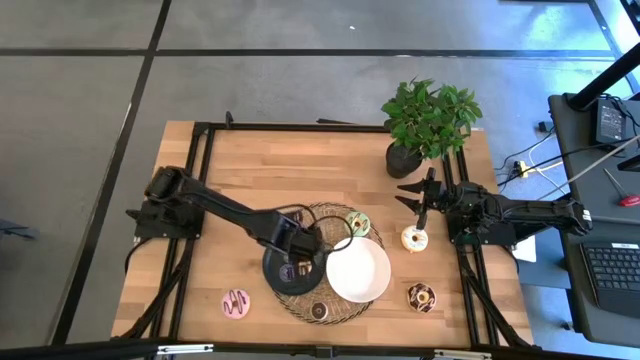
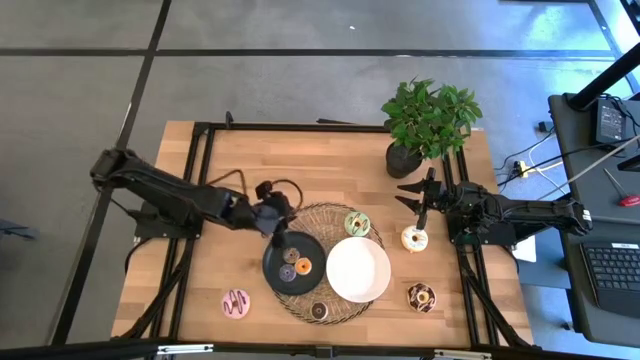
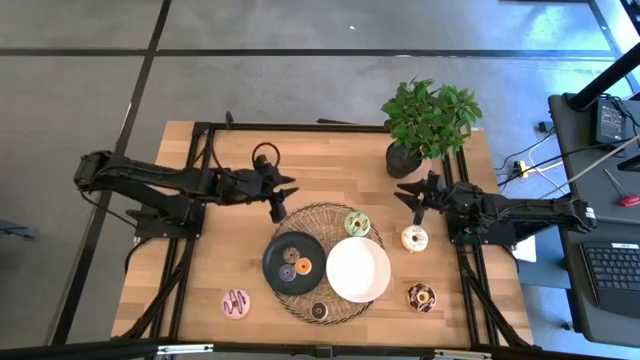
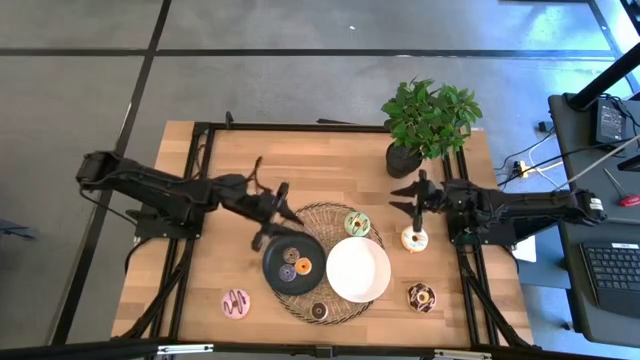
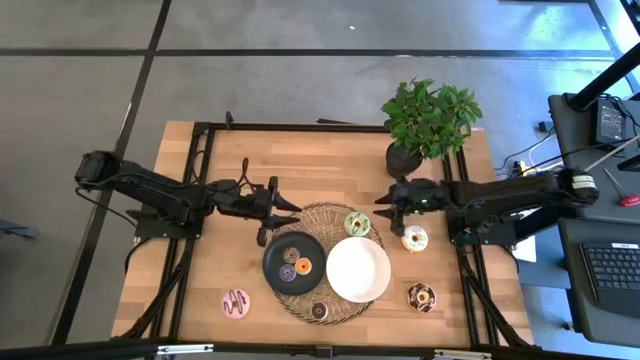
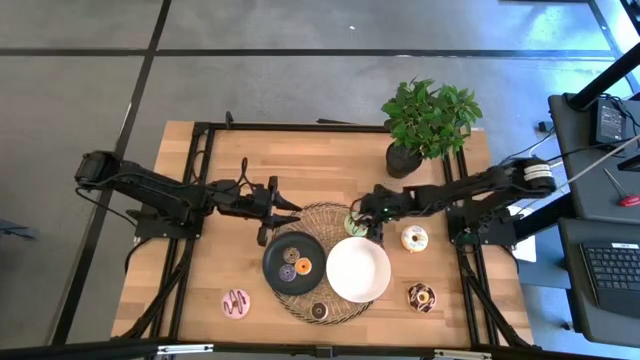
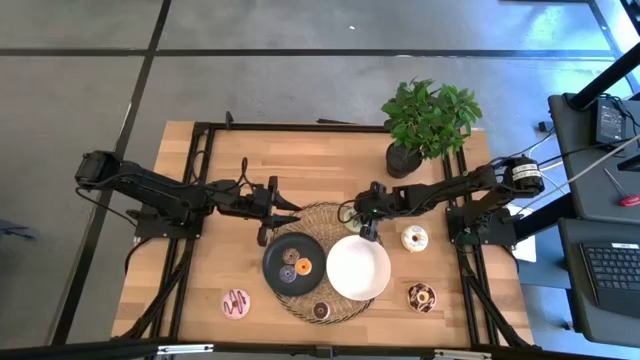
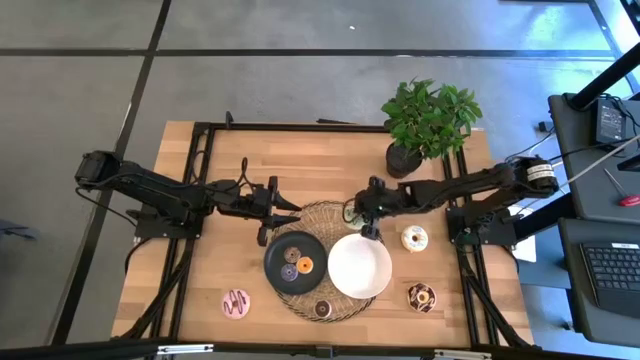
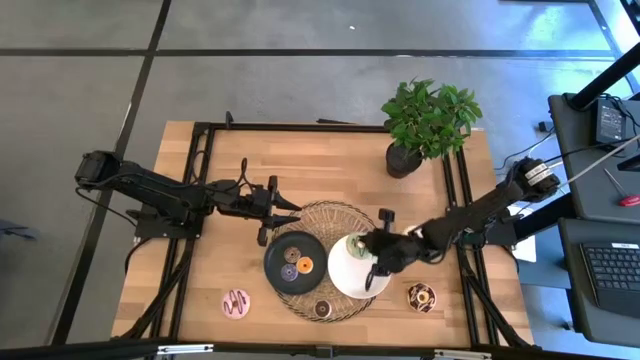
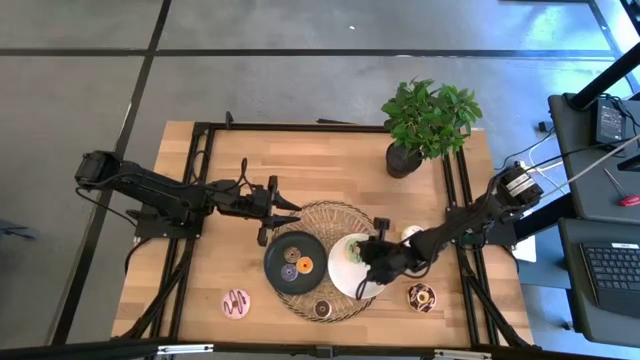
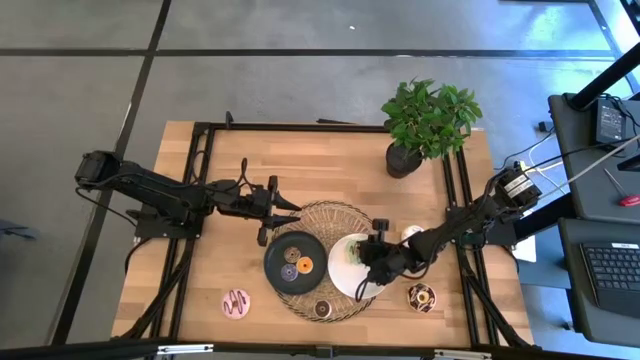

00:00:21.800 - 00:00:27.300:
Task: Pick & Place donuts
Put the big green donut into the white plate

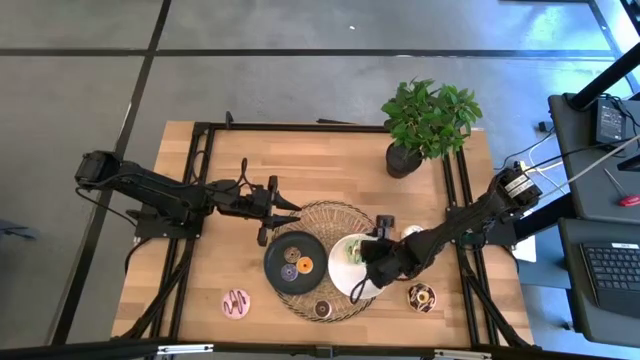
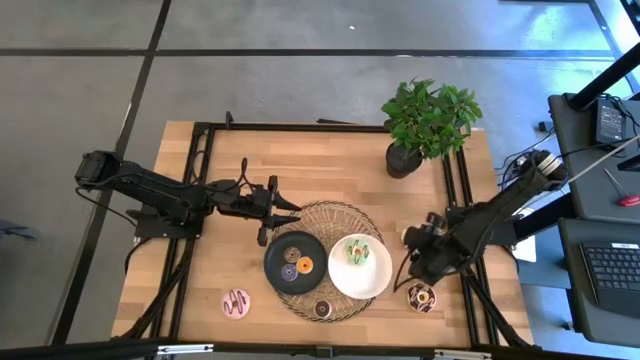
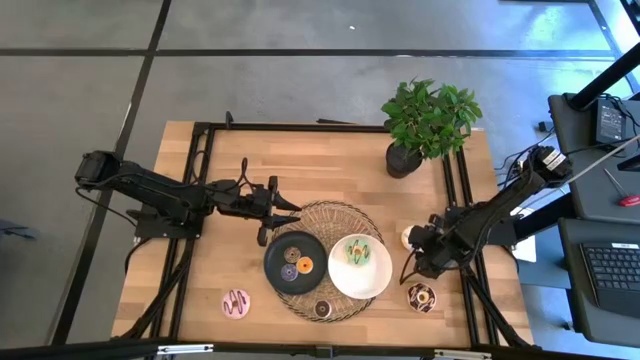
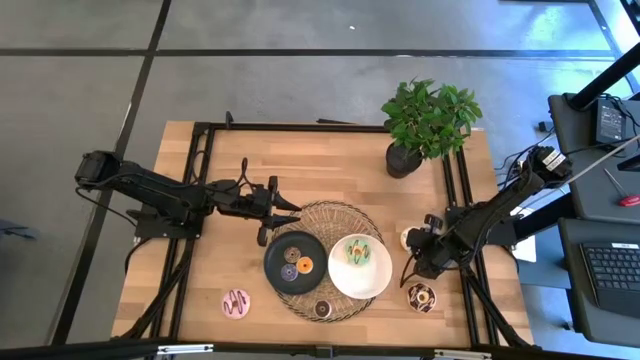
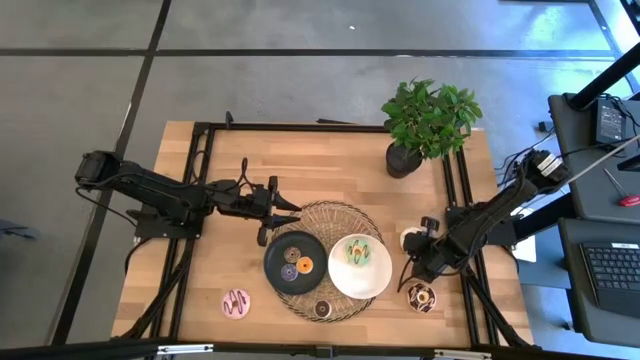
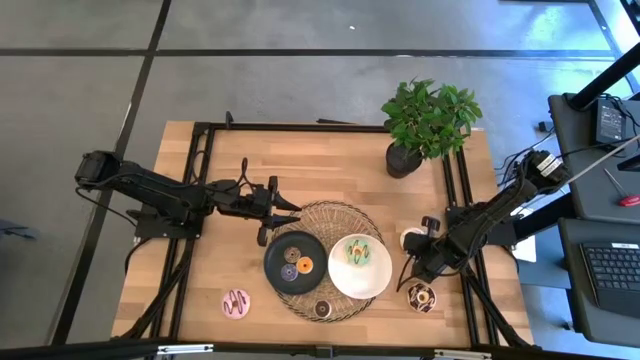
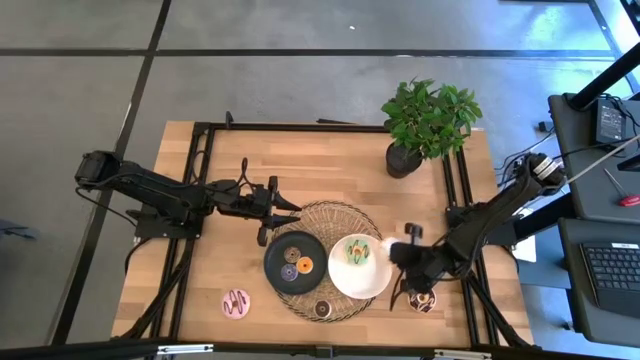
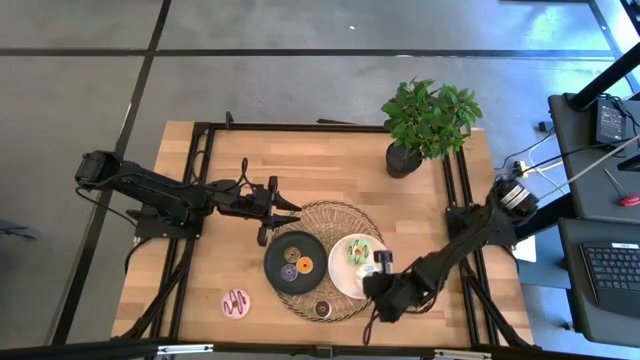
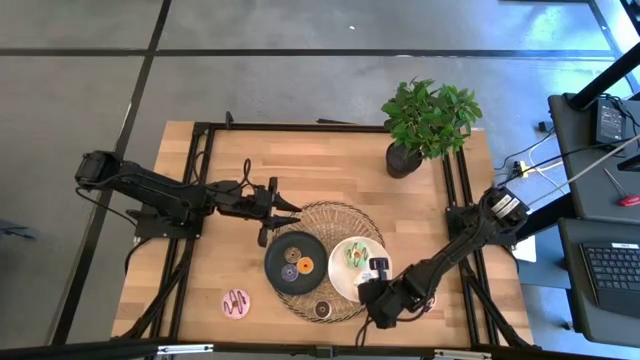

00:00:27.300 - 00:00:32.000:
Put the big white donut into the white plate

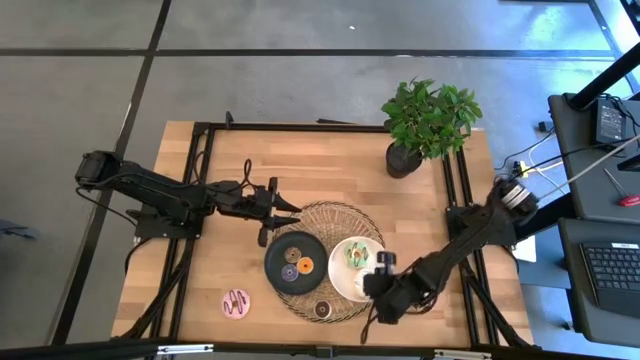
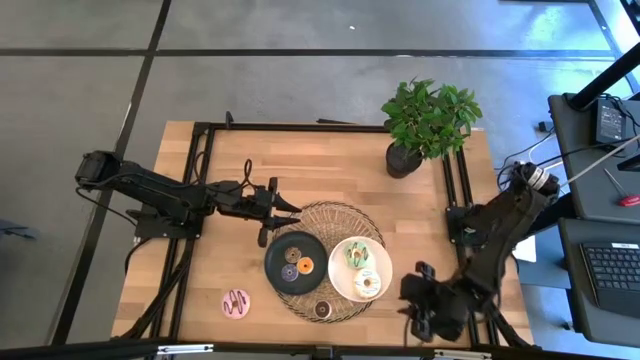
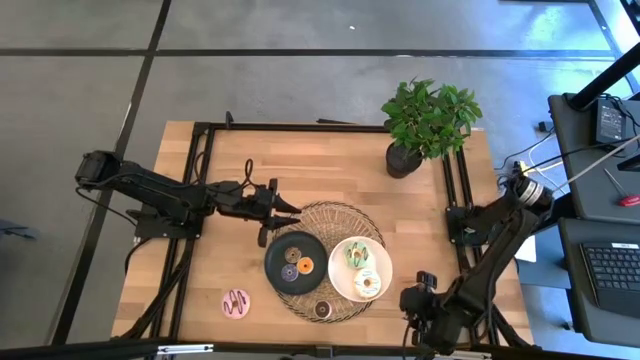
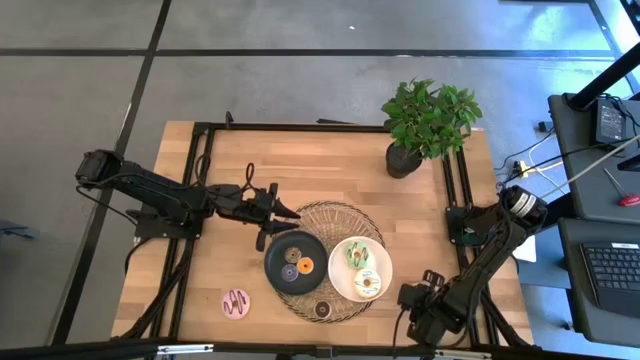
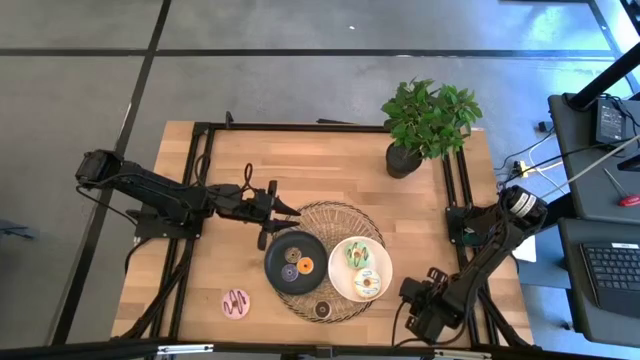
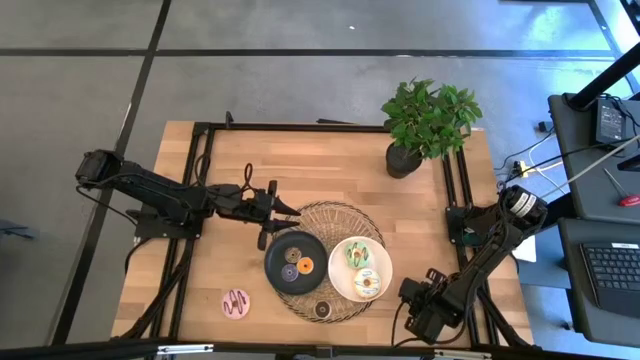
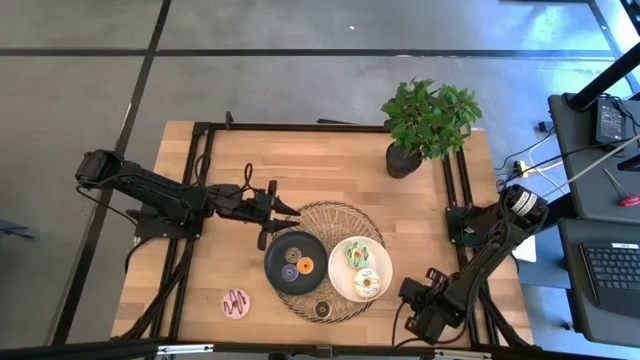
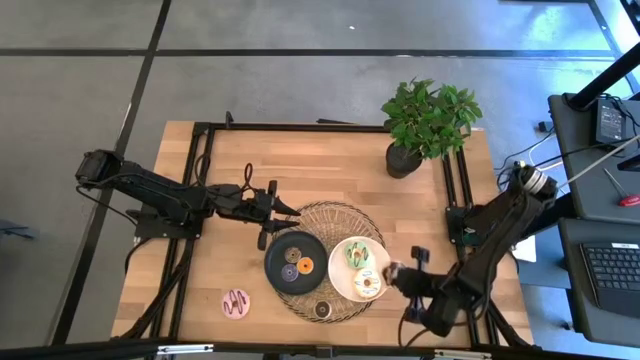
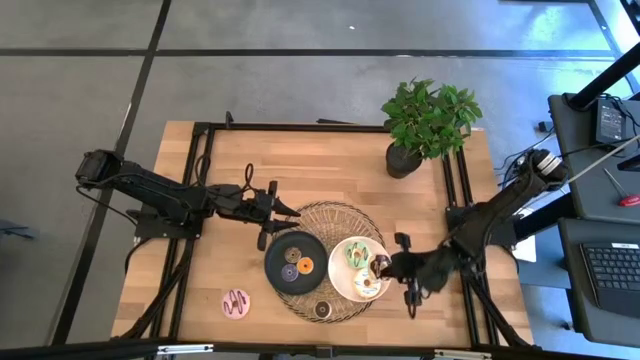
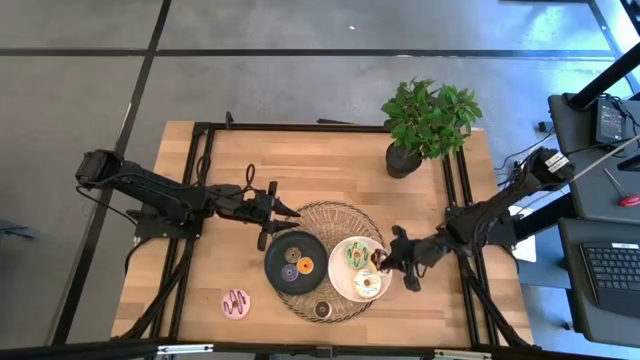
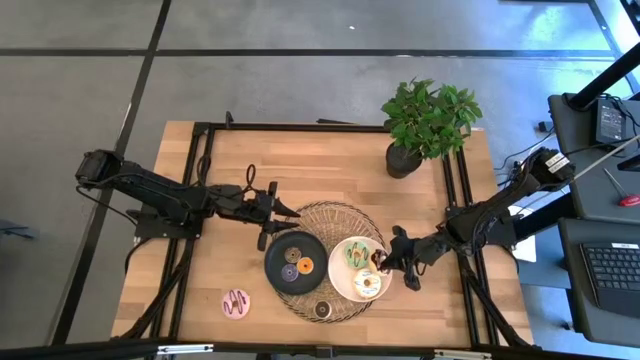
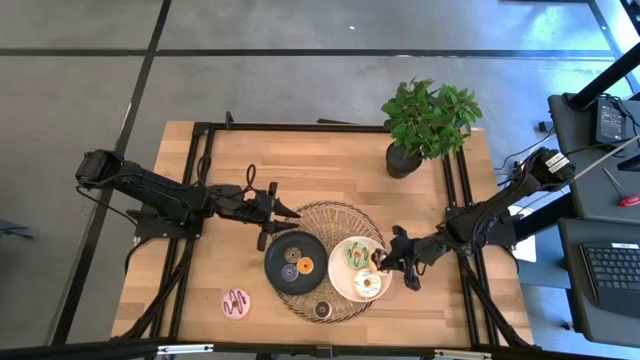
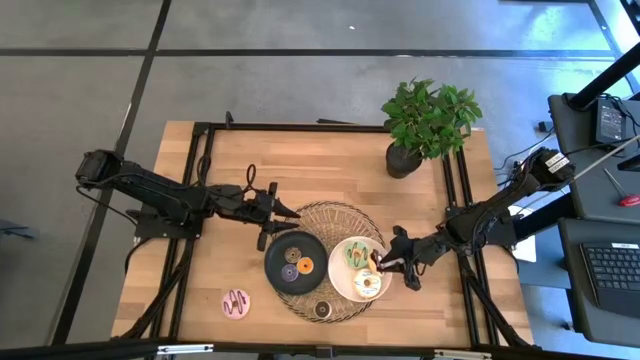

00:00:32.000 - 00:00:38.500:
Put the big black donut into the white plate

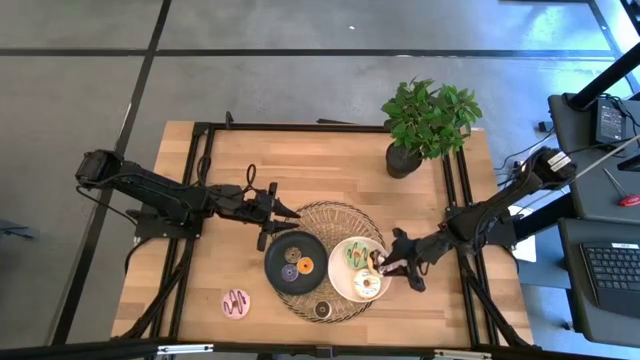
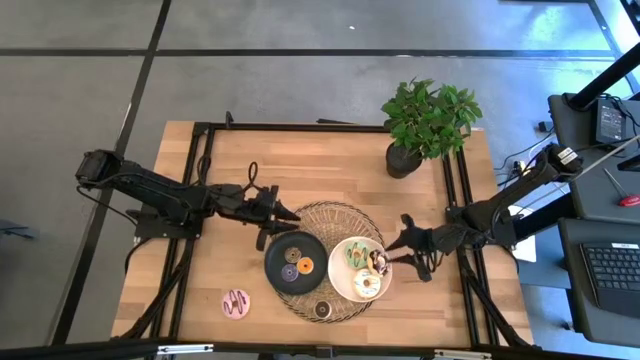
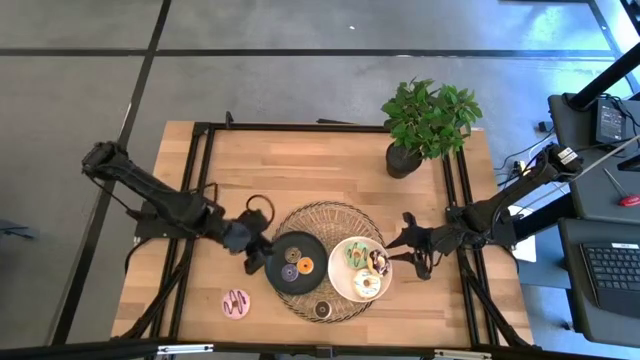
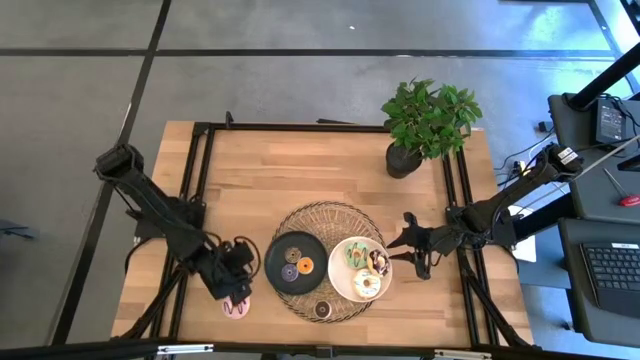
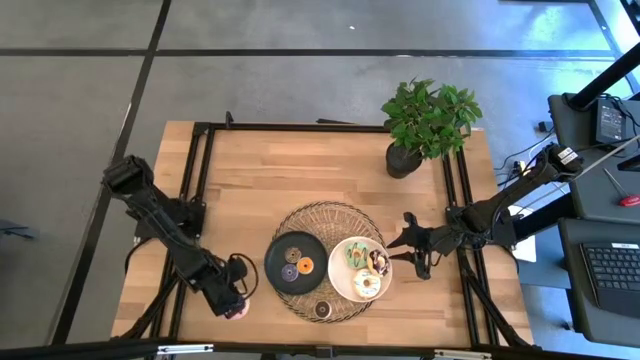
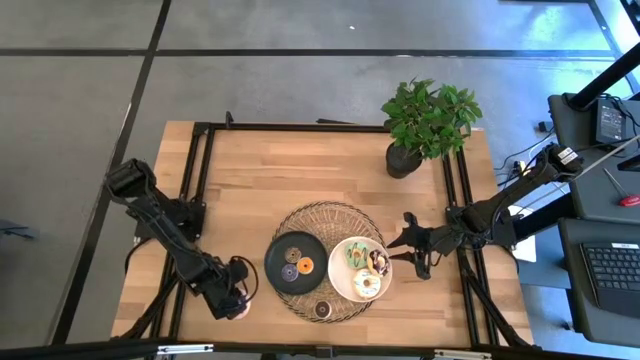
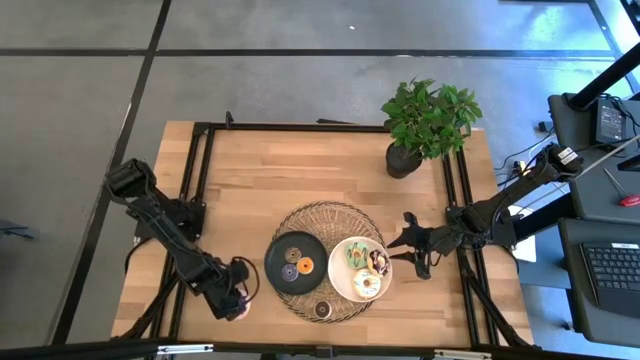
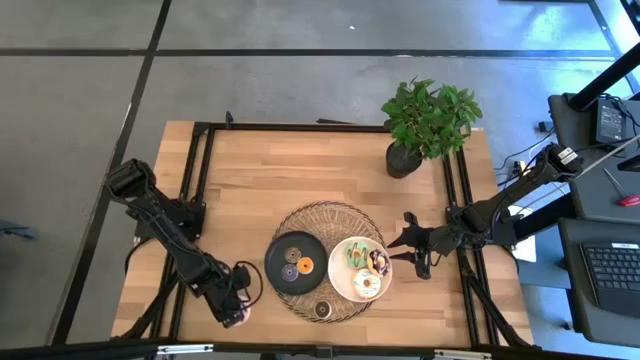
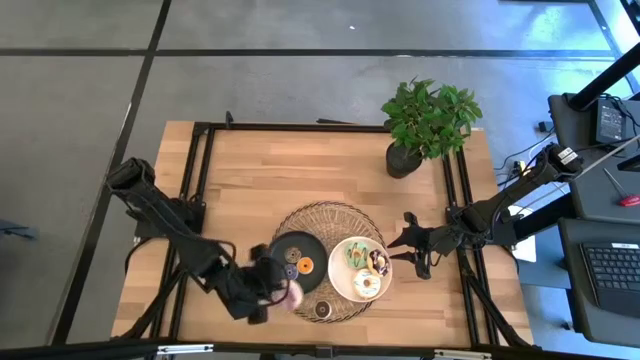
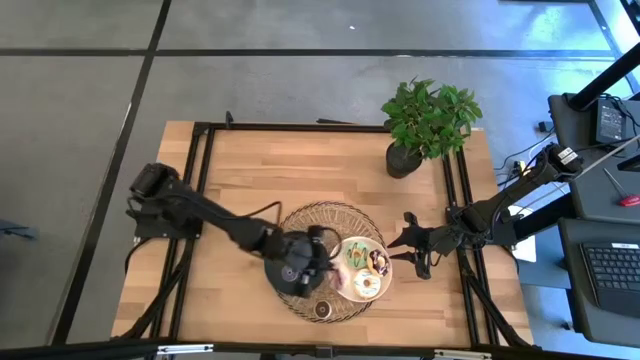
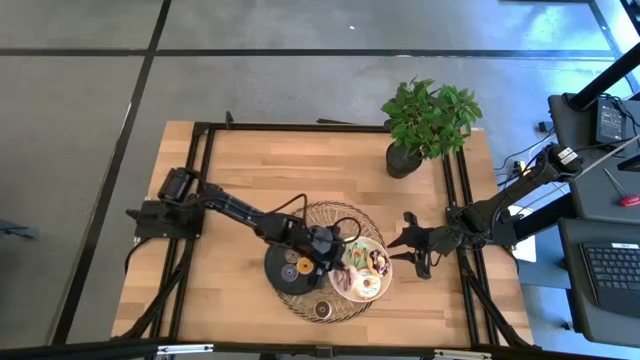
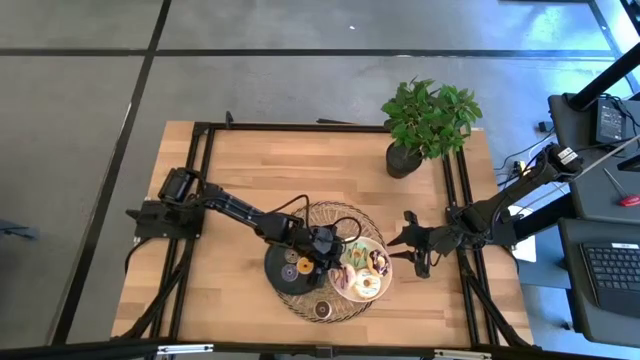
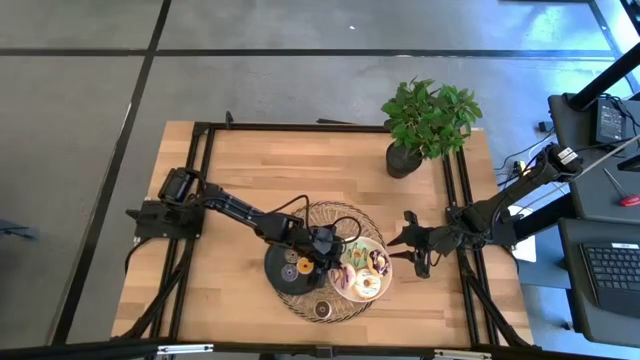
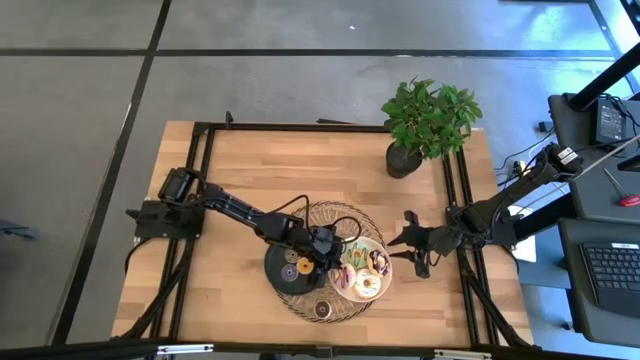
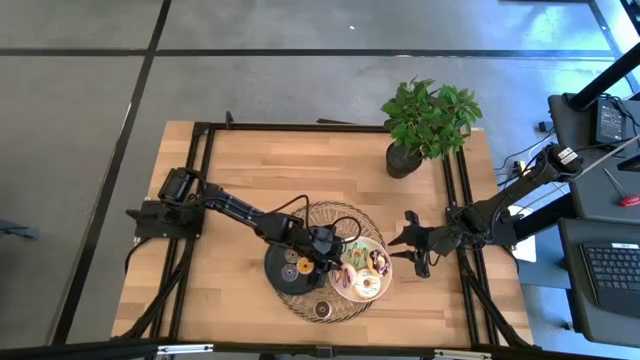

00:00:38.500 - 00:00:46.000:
Put the big purple donut into the white plate
